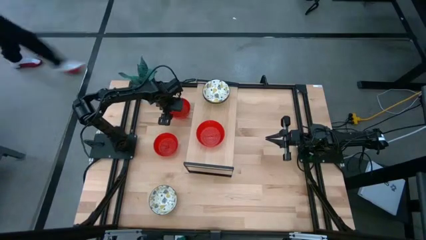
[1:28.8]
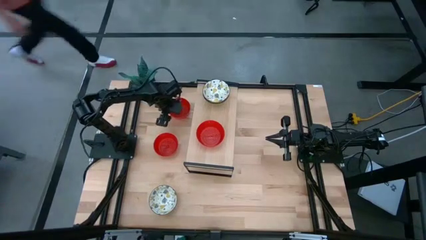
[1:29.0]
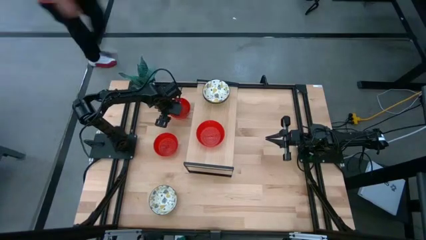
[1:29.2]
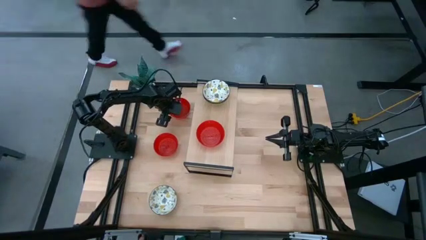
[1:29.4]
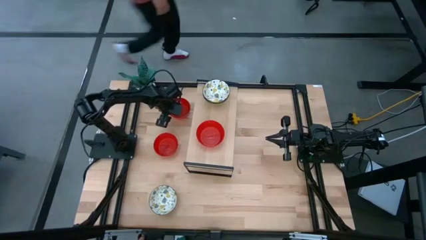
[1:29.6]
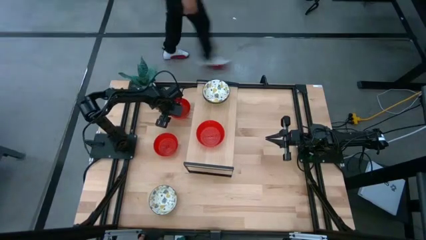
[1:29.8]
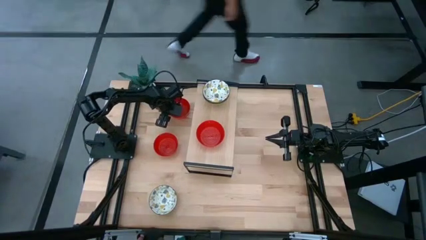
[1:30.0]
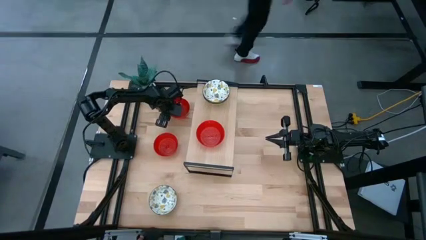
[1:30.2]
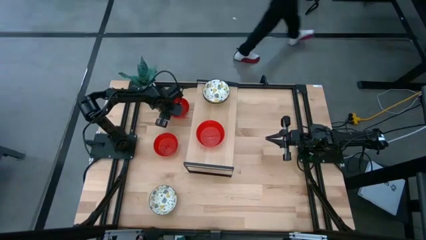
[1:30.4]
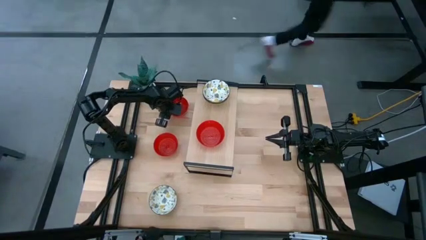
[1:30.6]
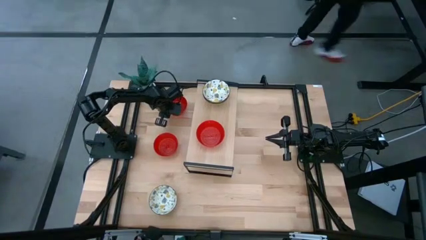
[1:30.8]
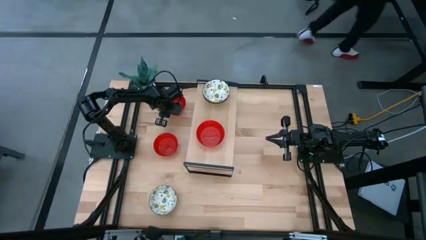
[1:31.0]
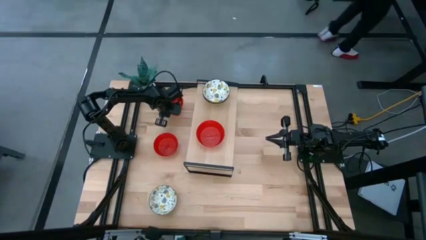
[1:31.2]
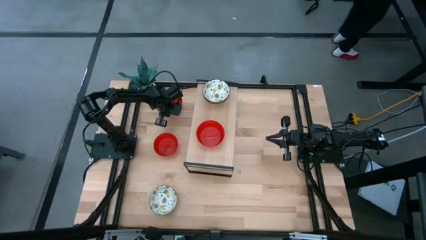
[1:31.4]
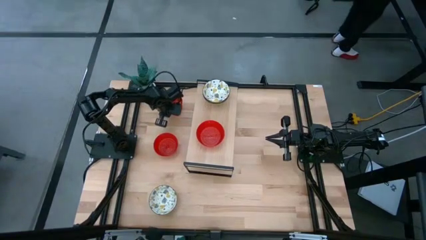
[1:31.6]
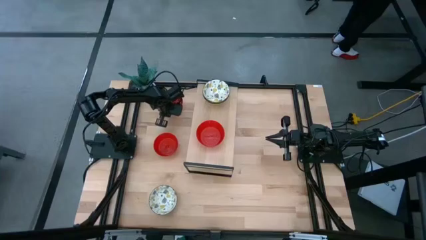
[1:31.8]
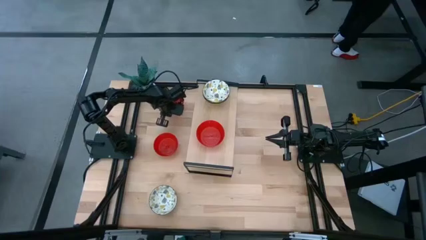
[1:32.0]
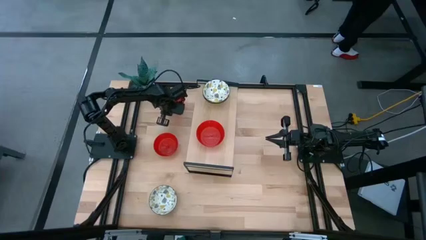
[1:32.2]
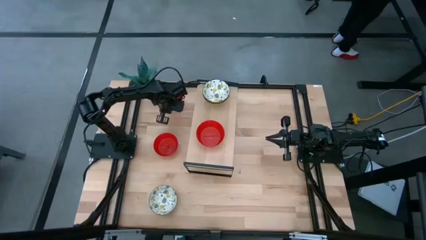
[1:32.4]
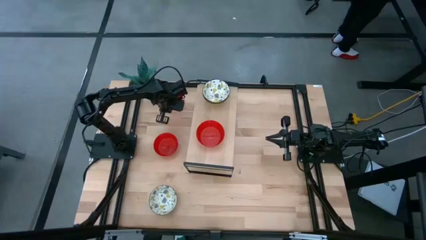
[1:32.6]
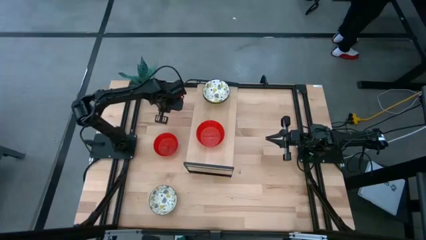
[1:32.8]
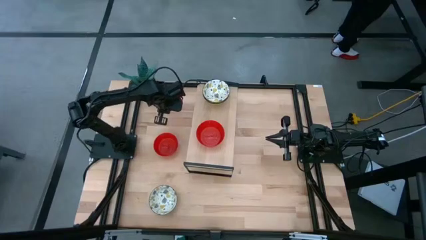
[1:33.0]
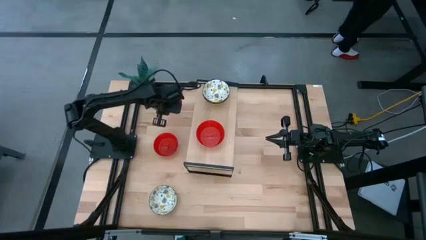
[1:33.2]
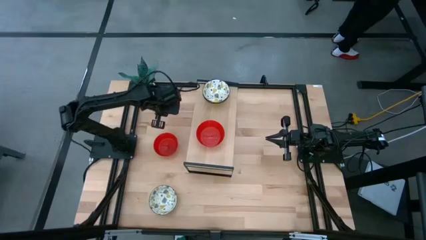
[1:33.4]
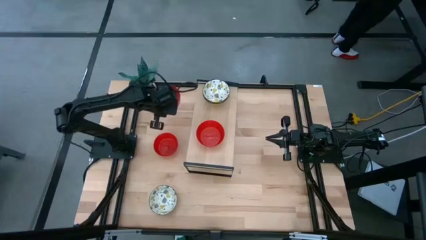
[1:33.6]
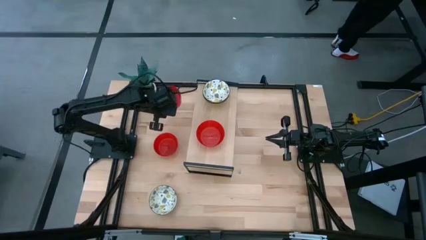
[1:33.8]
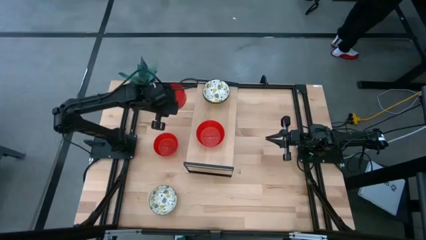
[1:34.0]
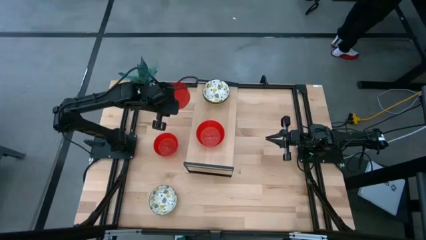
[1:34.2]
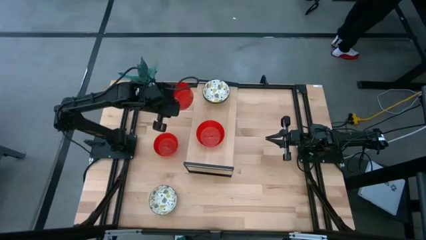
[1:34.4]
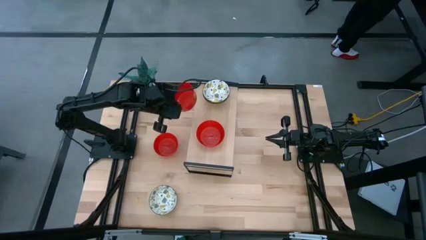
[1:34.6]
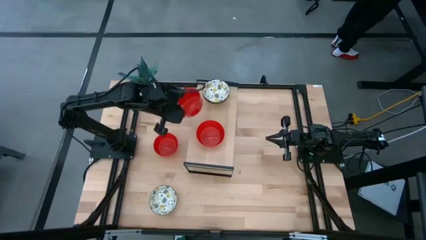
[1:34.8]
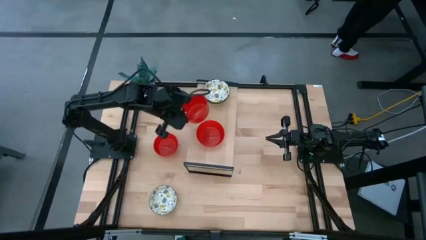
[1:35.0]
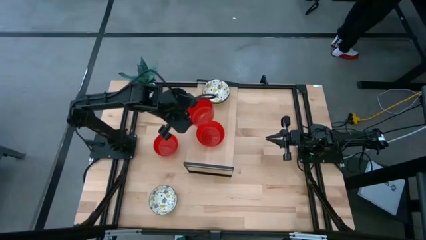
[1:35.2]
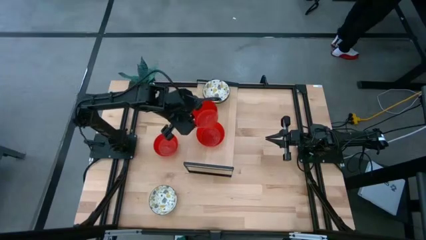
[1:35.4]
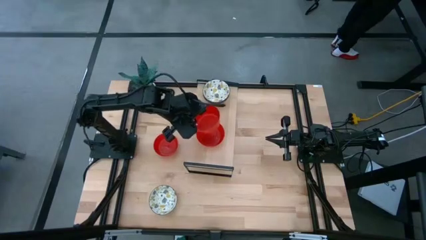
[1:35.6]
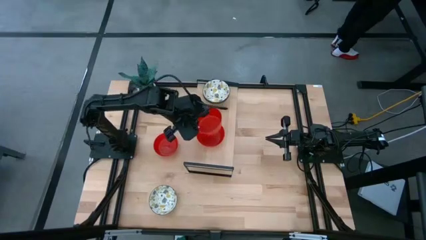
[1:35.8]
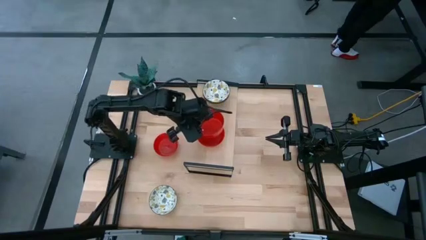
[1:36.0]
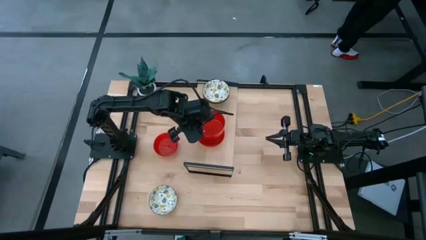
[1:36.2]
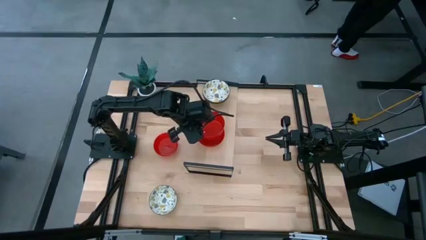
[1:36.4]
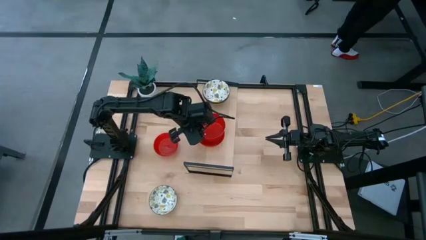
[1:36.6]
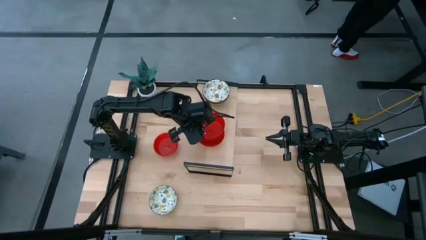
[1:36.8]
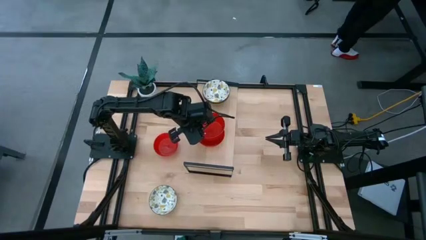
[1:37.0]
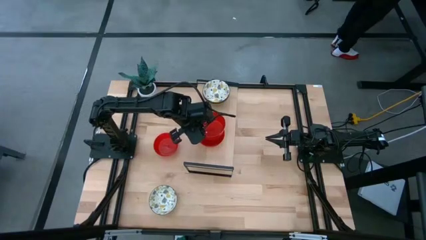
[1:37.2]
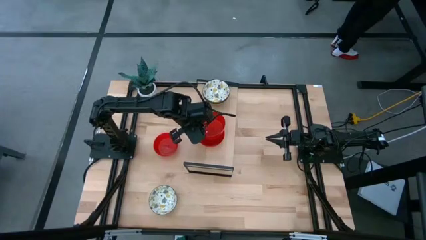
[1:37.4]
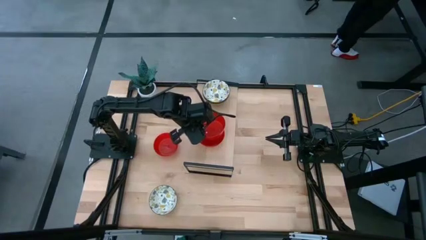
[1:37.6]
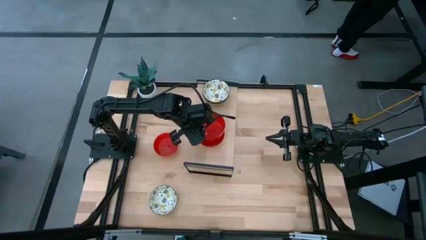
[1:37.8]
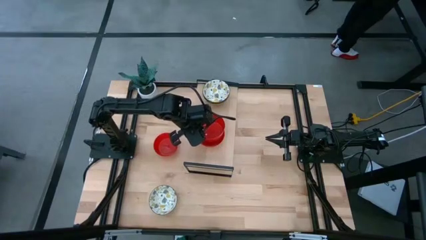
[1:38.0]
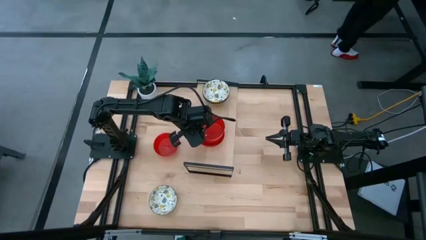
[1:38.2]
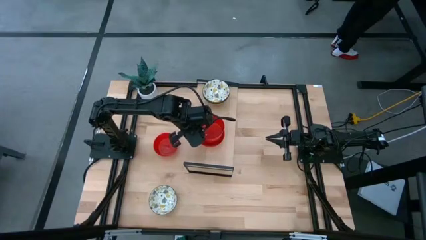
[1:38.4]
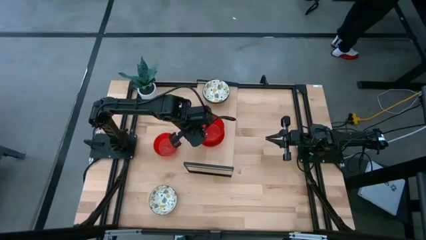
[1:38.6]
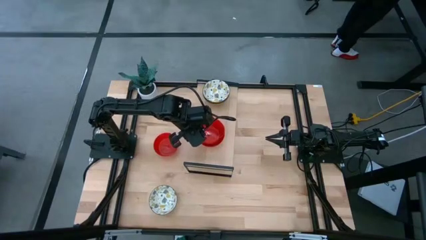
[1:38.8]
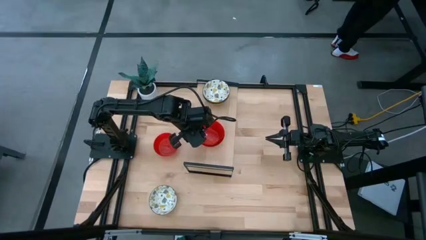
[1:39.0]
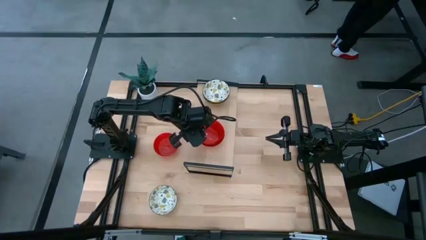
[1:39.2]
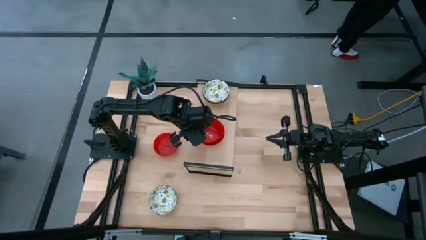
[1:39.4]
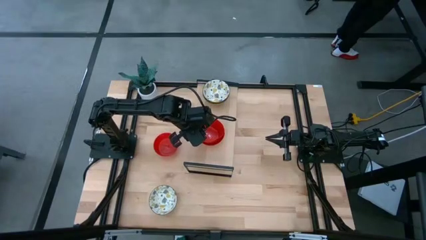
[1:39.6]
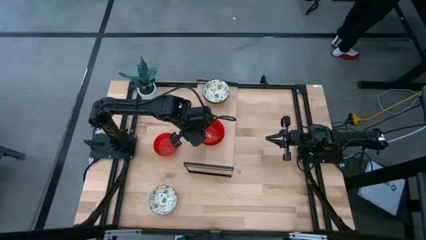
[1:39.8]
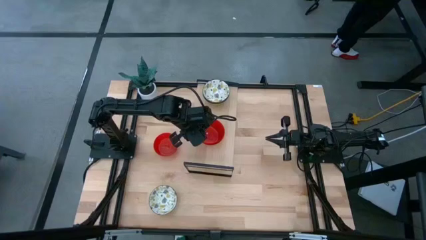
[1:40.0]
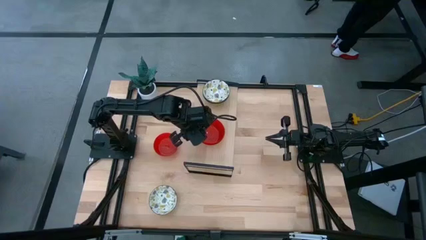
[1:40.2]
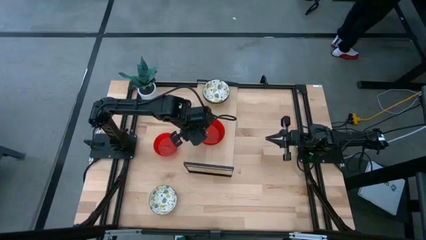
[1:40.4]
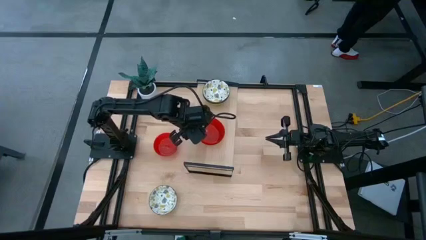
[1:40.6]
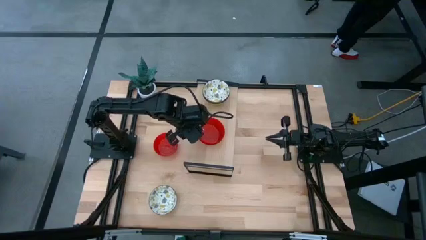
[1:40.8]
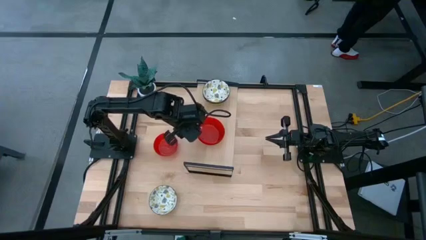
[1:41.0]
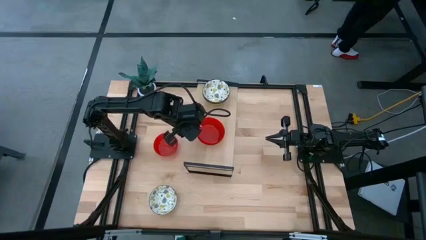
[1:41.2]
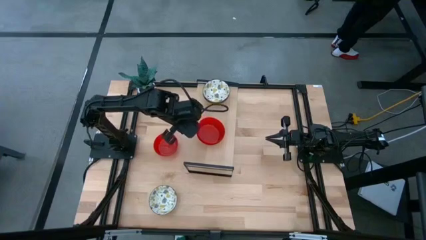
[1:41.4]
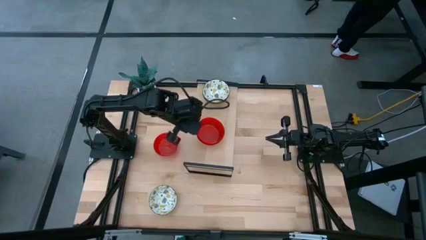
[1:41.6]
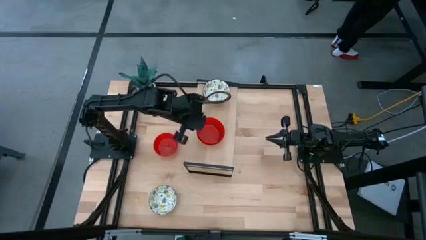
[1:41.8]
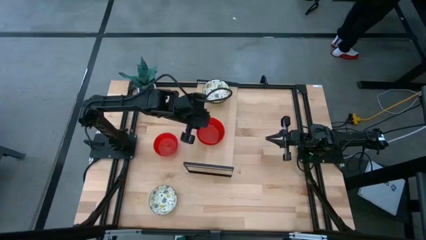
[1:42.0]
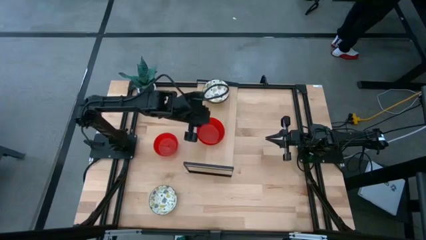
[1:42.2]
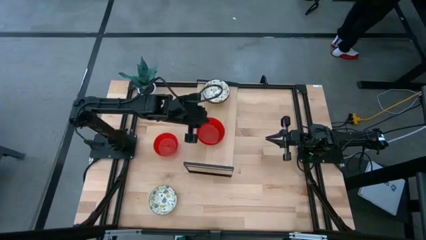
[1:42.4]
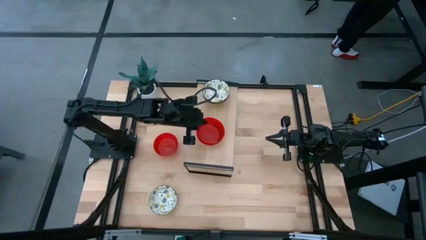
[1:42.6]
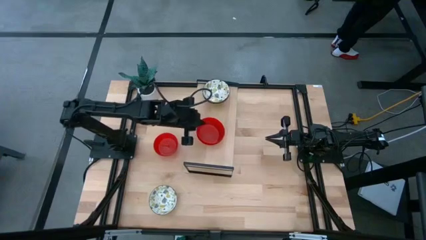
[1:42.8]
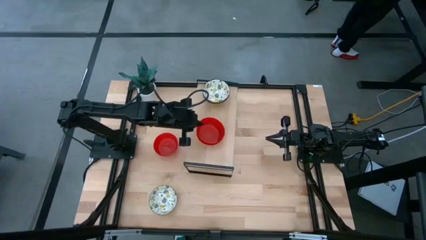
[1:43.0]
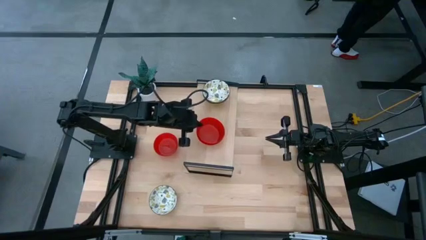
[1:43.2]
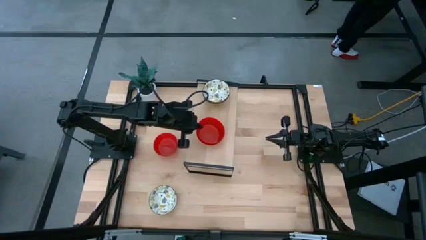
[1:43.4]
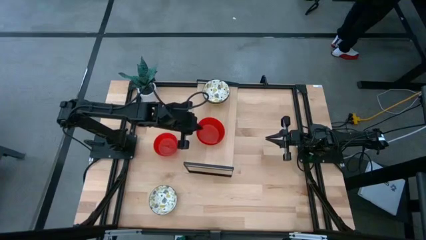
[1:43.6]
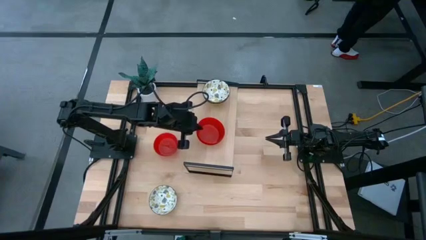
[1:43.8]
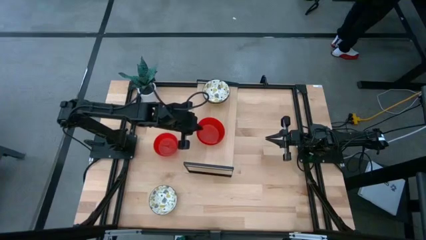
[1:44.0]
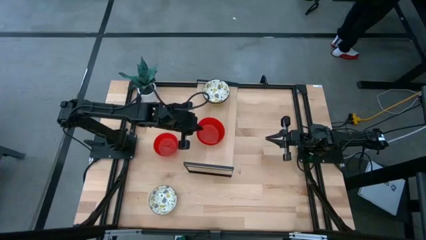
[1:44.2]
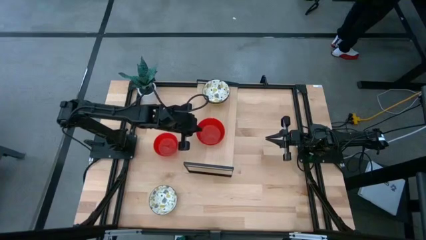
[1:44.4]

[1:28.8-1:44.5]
Task: Pick & Place Mini bowls
Stack the top red bowl on top of the red bowl on the shelf

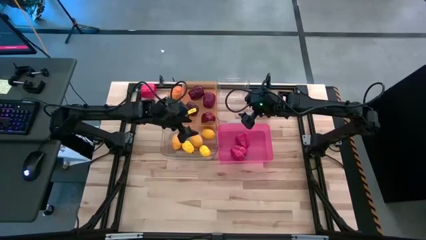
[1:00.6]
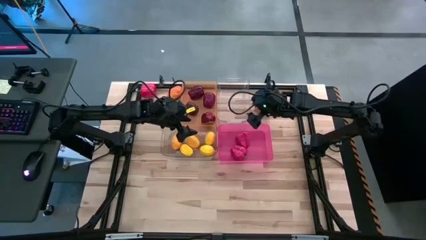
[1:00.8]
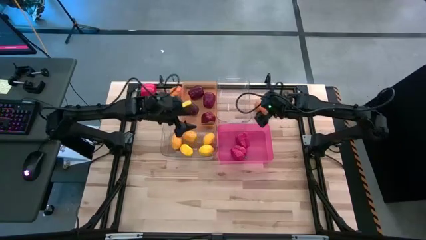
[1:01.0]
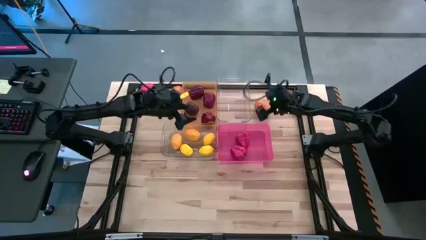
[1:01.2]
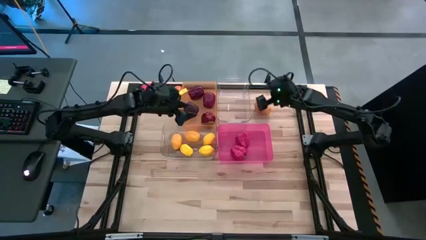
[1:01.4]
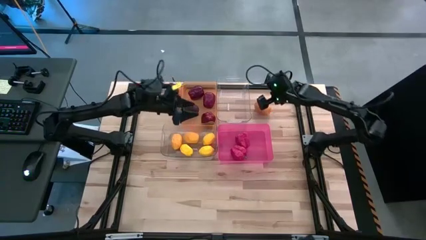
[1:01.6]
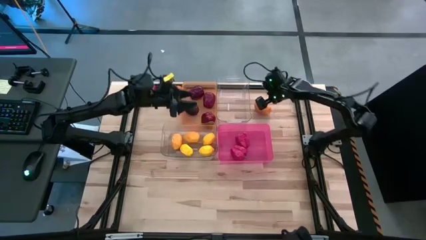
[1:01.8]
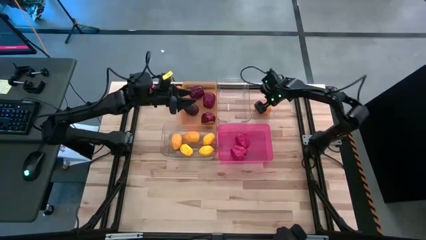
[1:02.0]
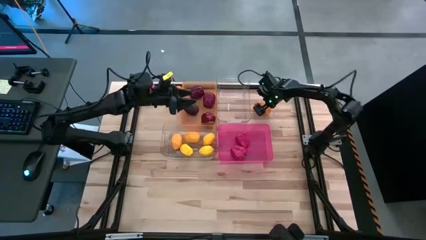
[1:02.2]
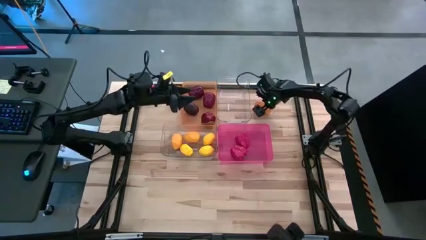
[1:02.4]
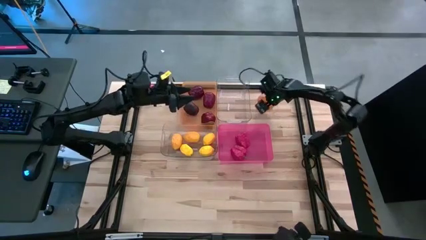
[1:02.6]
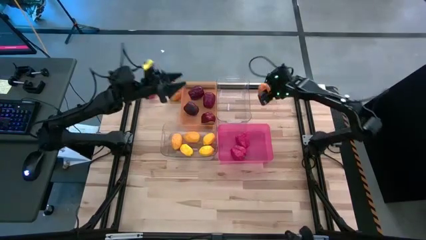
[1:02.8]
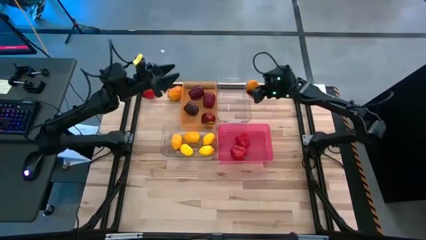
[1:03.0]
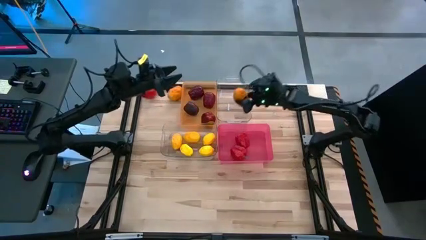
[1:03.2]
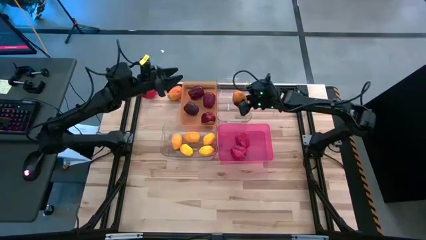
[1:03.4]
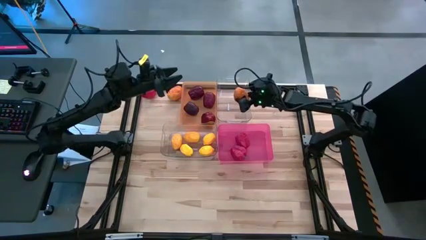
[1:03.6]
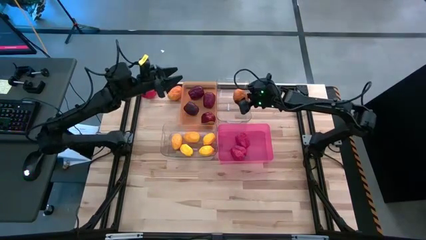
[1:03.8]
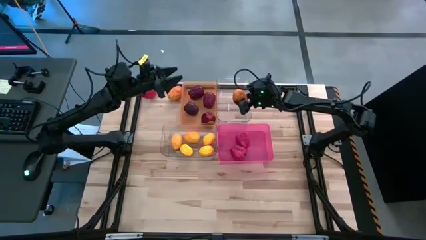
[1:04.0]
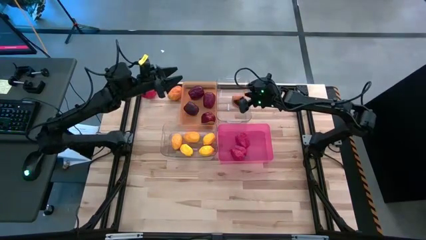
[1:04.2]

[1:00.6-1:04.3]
Task: Sort produce into baskets
Put the yellow potato into the top transparent bin
